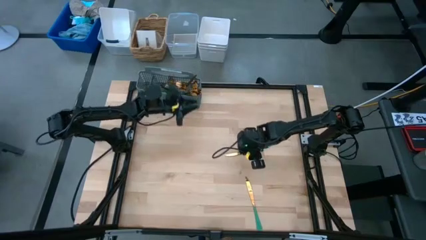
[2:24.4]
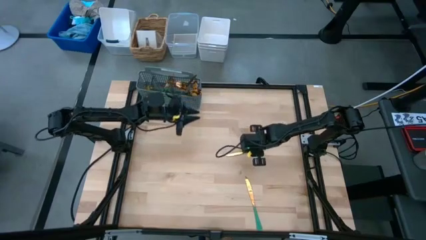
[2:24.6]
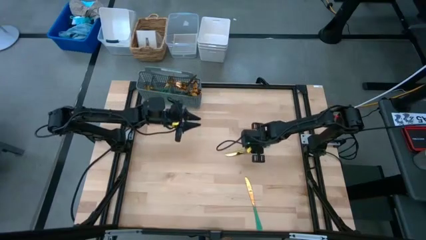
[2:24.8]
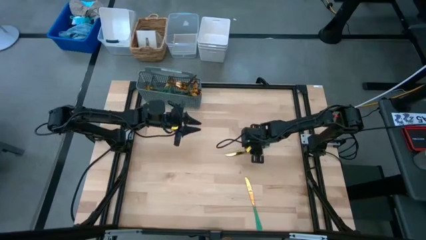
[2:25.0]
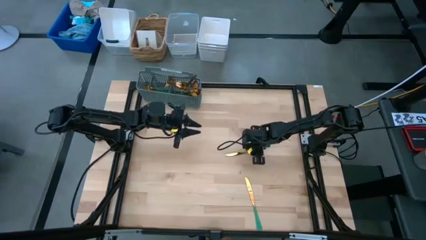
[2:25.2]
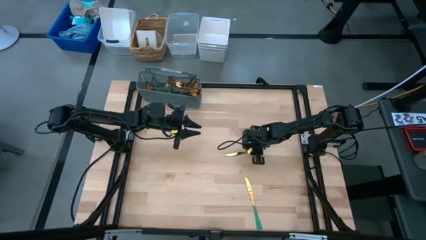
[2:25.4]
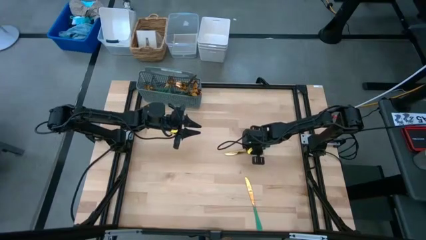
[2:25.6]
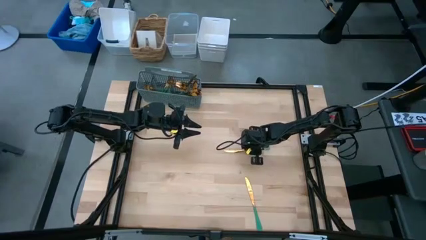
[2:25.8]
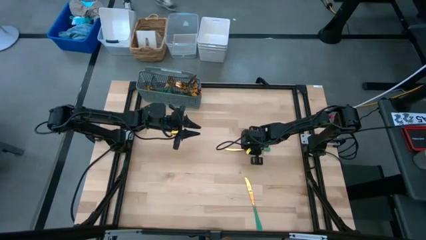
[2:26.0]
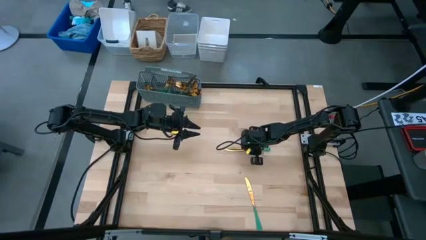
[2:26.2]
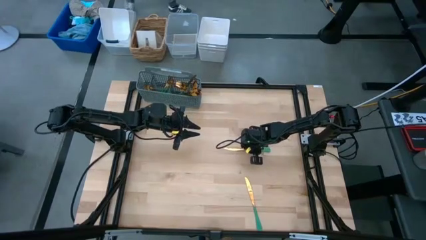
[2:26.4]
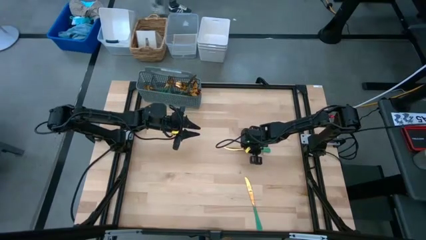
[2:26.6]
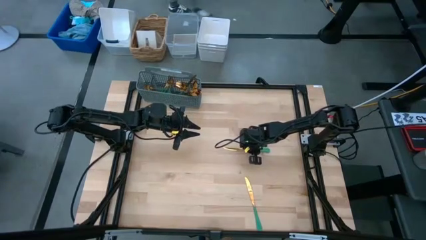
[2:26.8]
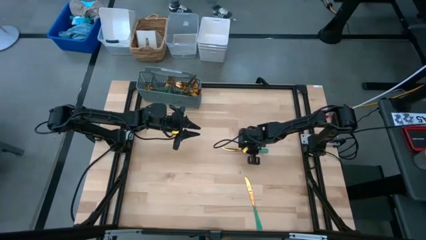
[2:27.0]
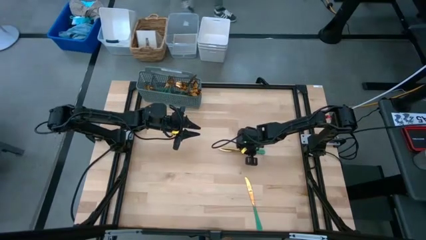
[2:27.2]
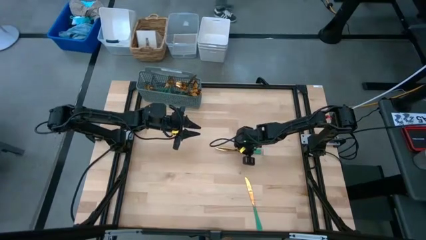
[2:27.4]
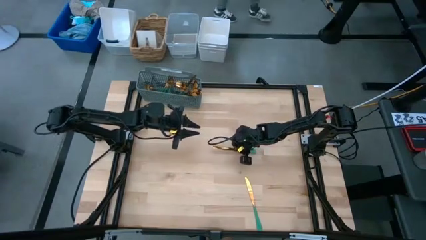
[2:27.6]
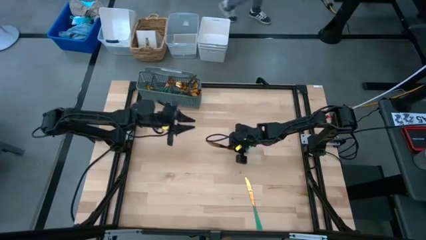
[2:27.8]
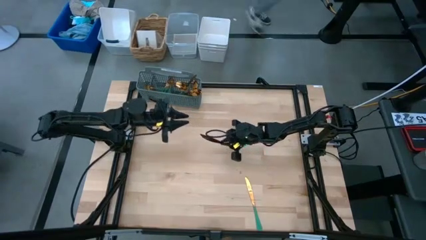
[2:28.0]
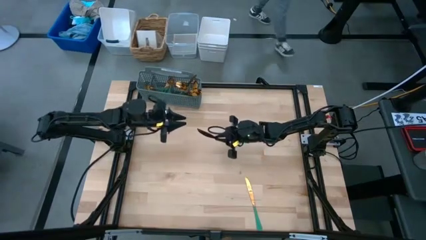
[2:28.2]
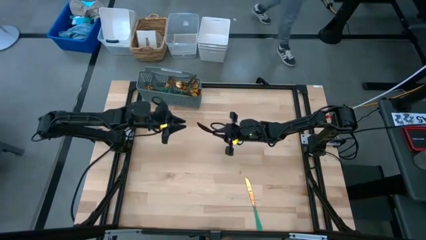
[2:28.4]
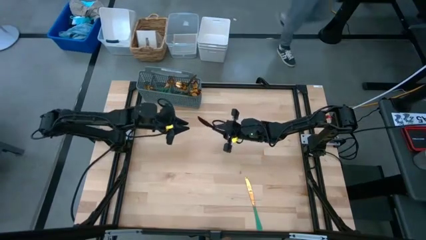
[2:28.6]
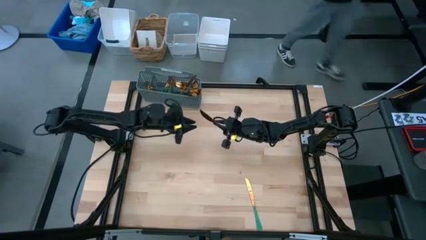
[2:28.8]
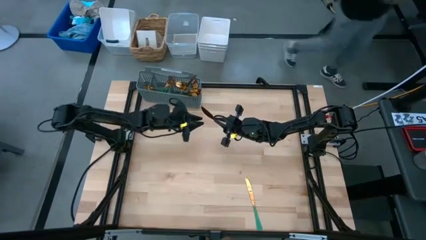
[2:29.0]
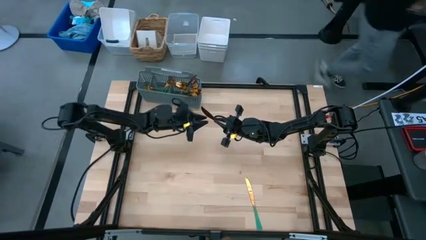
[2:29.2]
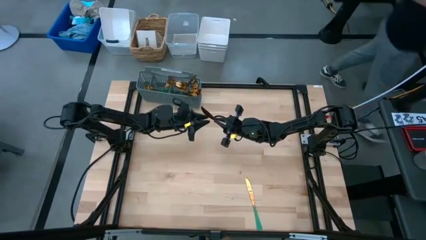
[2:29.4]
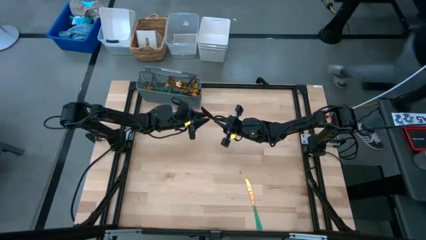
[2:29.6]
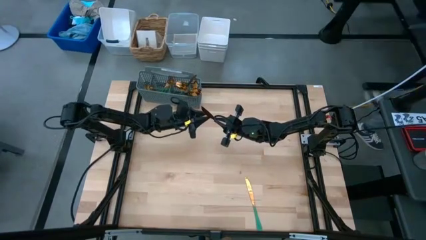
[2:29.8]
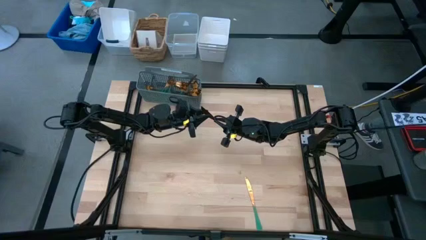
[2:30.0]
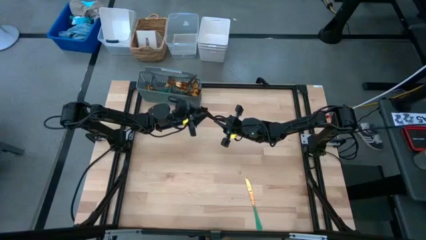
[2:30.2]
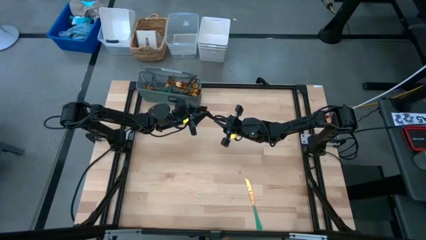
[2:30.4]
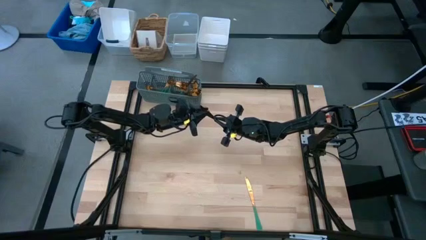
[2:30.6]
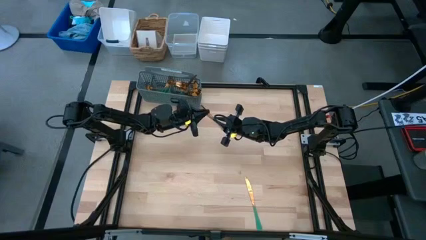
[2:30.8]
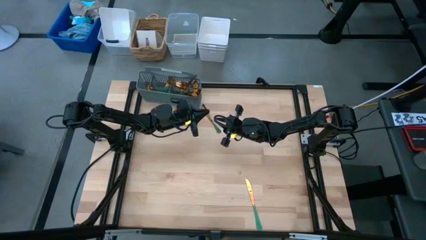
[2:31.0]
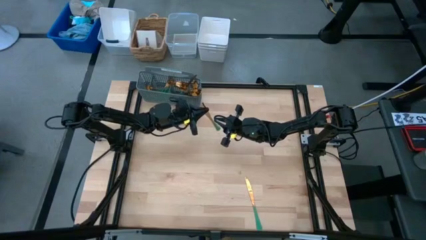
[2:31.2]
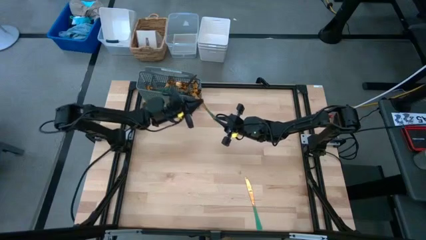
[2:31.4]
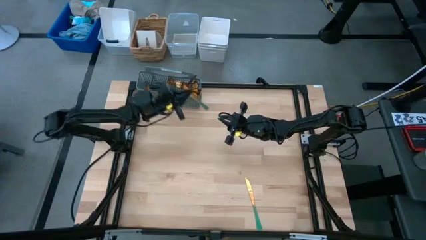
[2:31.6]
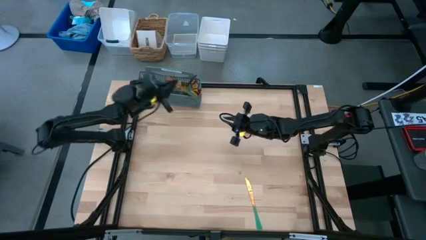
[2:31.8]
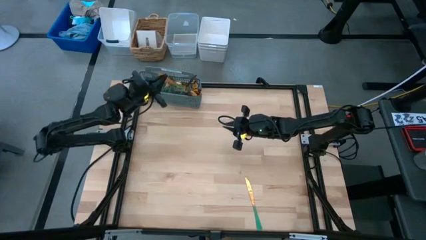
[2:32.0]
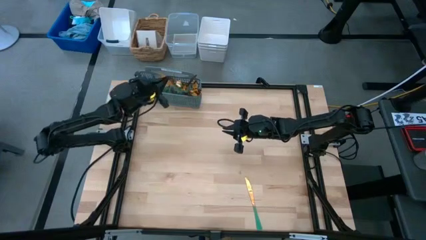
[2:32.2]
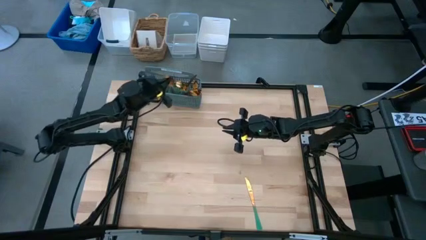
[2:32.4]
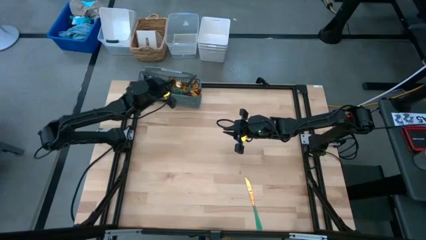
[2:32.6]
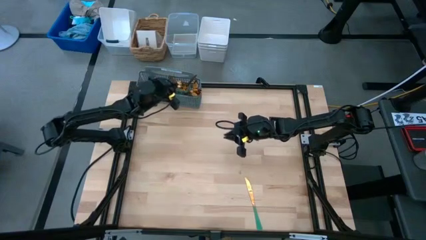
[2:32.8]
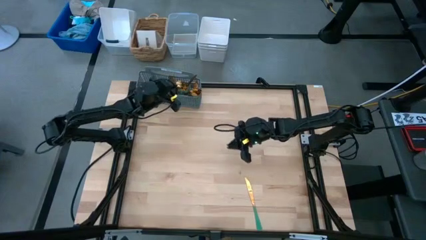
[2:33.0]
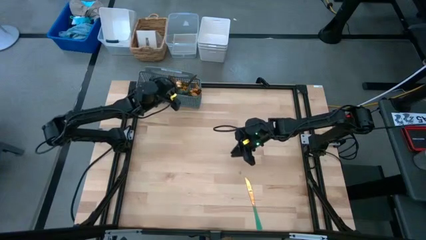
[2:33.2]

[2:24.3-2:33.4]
Task: Sort silverware
Put the green knife into the gray silverware basket

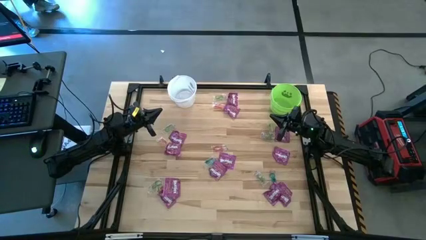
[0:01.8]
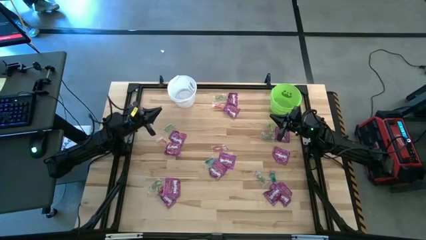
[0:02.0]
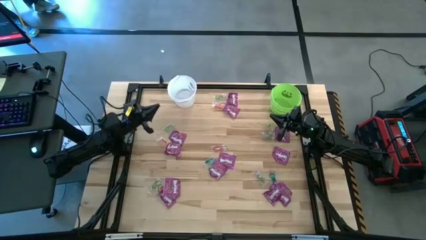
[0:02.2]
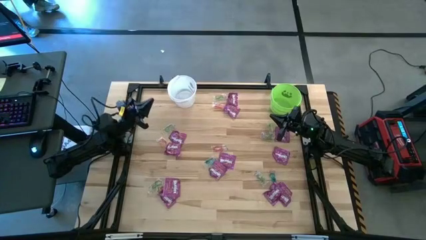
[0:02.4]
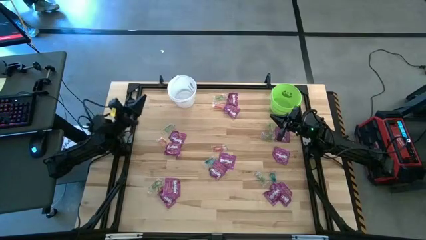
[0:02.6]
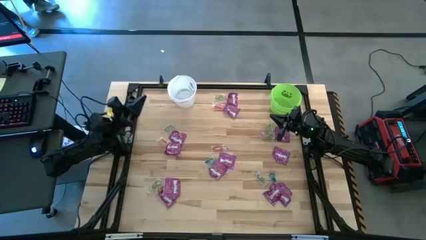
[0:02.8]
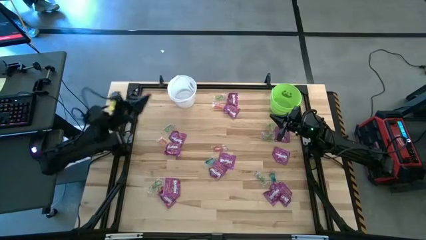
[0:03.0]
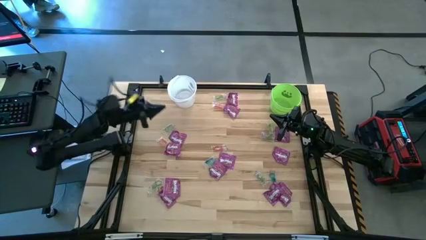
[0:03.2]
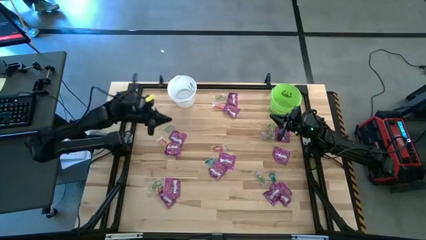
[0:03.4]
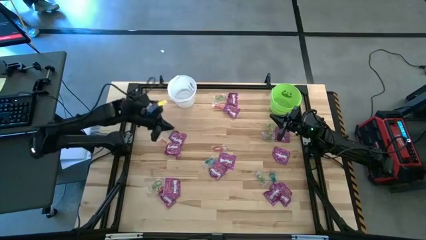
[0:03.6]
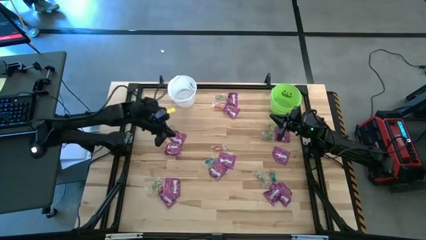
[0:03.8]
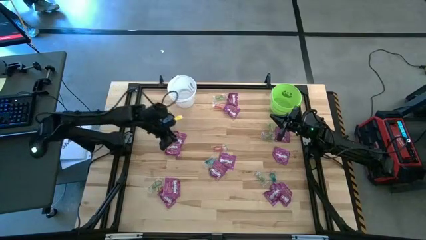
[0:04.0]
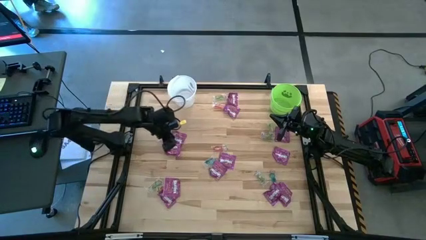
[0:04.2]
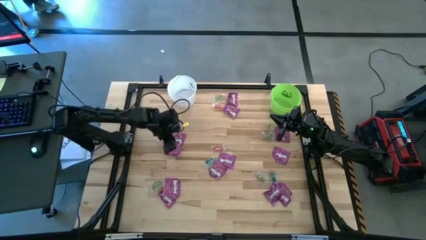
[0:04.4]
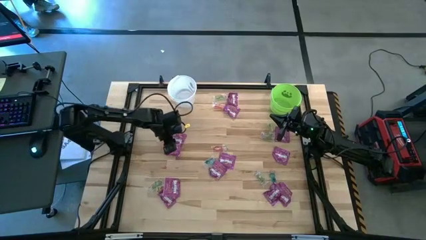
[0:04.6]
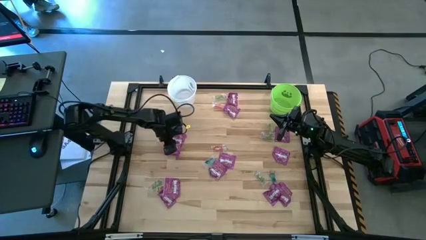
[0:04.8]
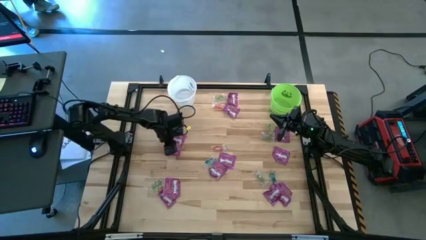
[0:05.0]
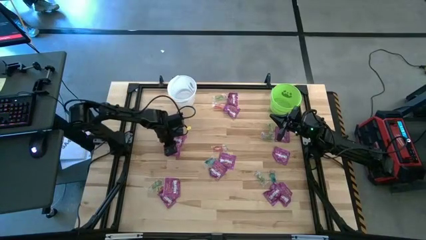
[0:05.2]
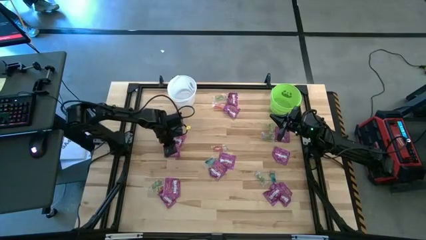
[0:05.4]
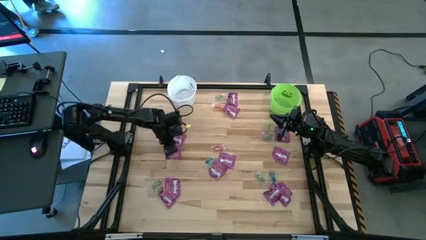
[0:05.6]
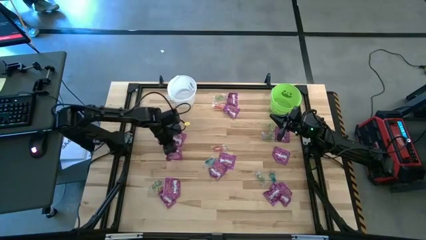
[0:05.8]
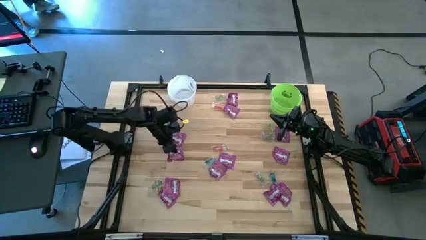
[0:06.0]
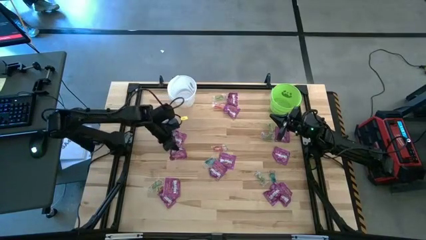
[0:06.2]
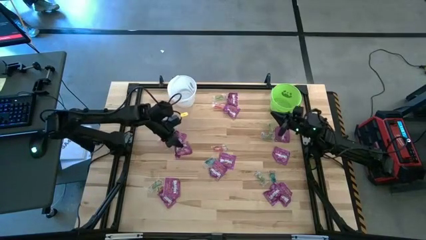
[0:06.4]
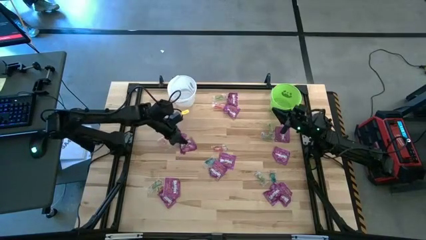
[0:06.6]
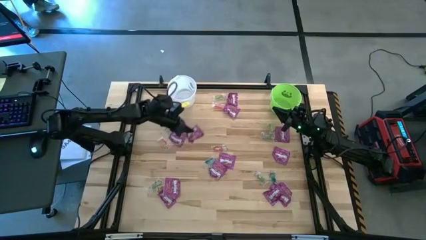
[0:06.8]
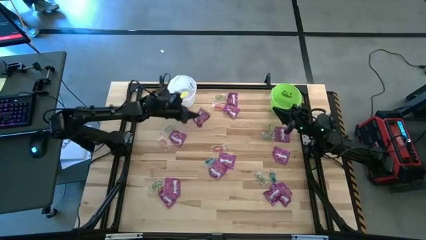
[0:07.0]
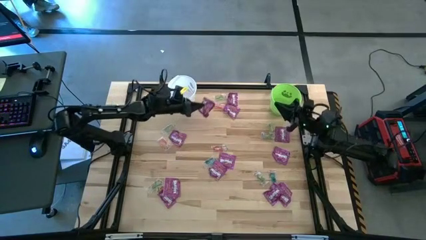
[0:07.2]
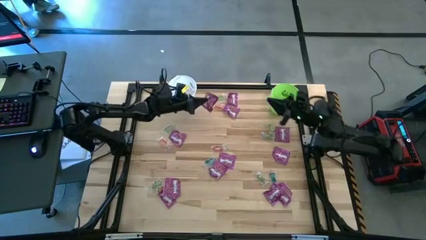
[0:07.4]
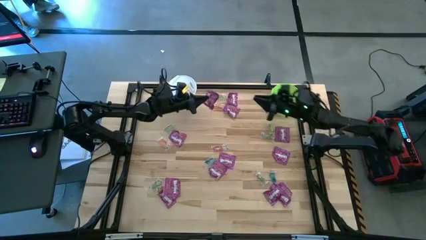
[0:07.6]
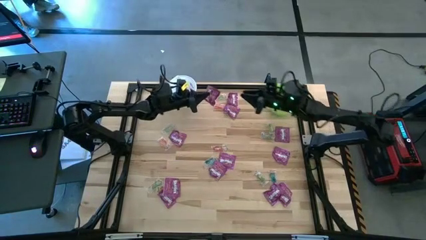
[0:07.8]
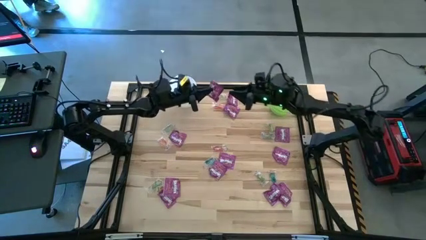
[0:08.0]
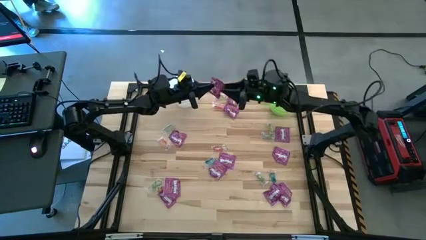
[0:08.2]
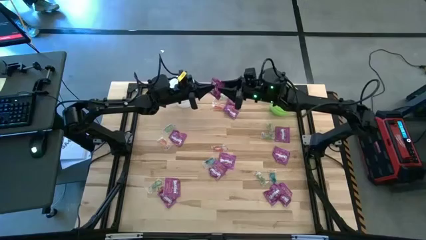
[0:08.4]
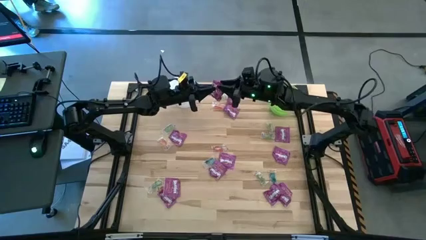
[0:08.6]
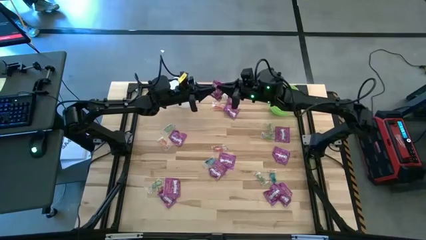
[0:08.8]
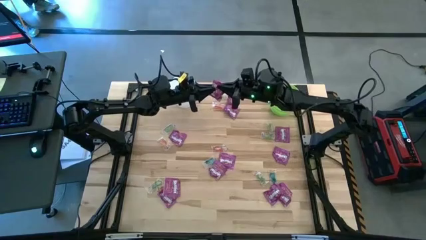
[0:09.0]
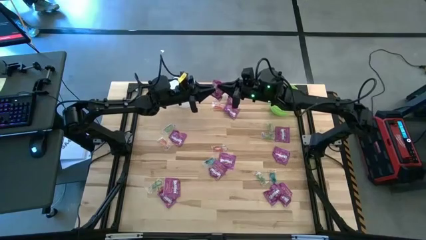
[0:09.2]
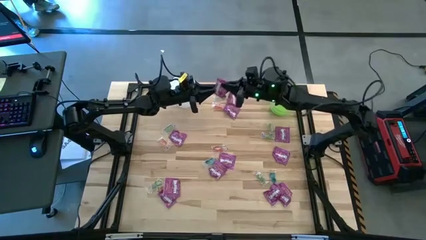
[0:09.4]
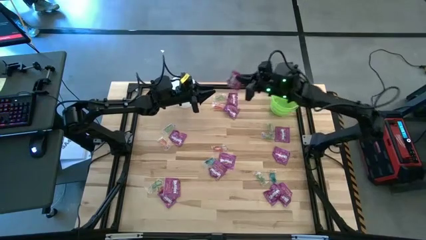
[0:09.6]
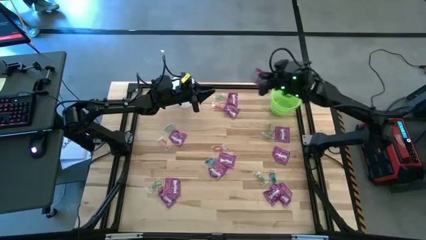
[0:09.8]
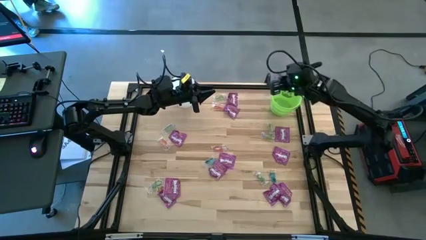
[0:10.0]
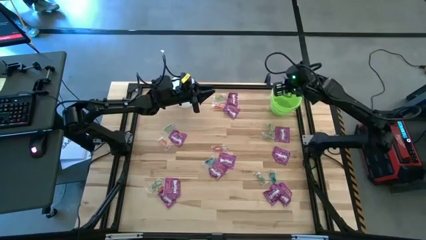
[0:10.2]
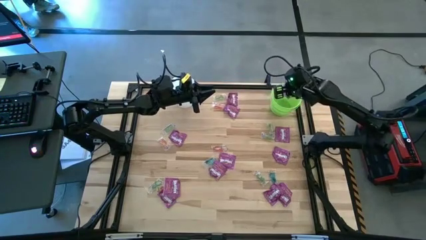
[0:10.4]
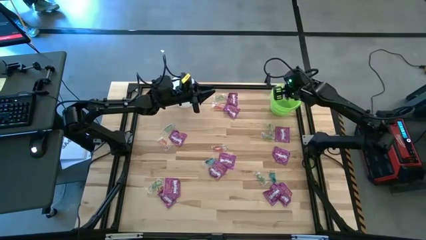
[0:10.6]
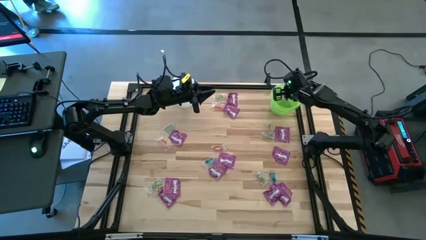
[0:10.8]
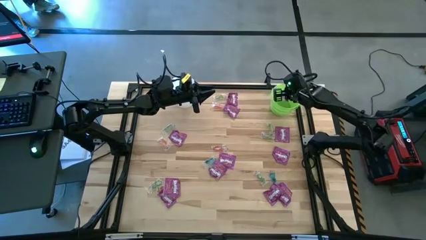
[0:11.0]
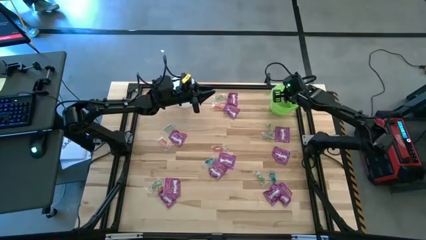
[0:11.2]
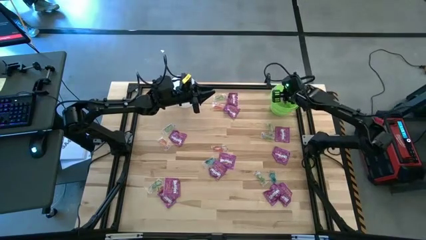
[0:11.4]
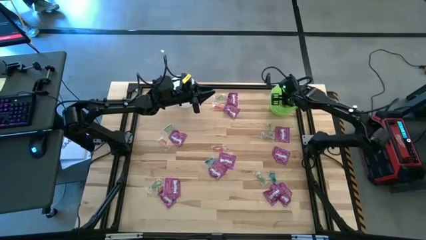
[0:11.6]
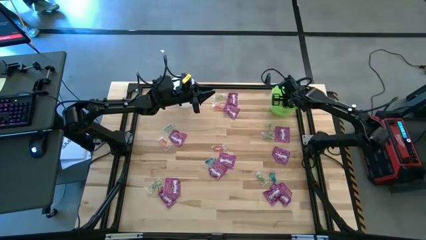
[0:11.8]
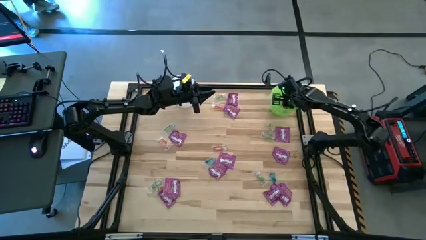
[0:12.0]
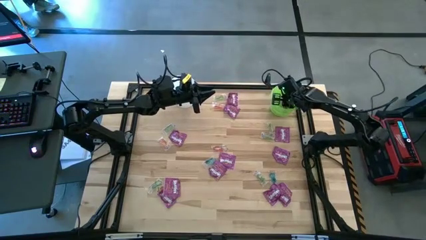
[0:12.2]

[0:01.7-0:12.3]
Task: Sort candy by brand, put in halloween buckets
Put the violet candy into the green bucket
